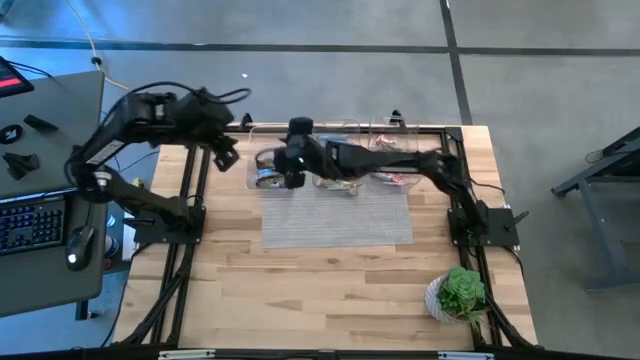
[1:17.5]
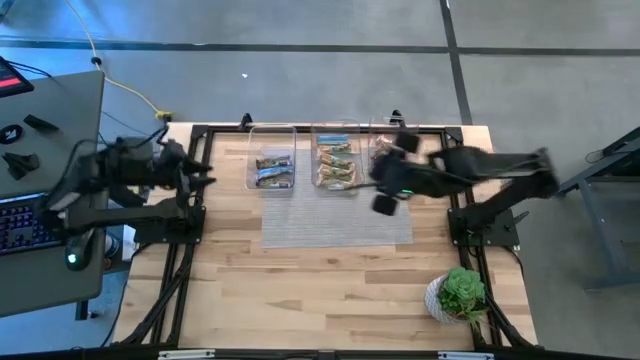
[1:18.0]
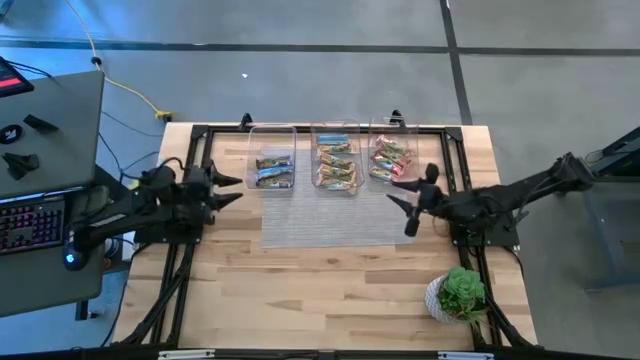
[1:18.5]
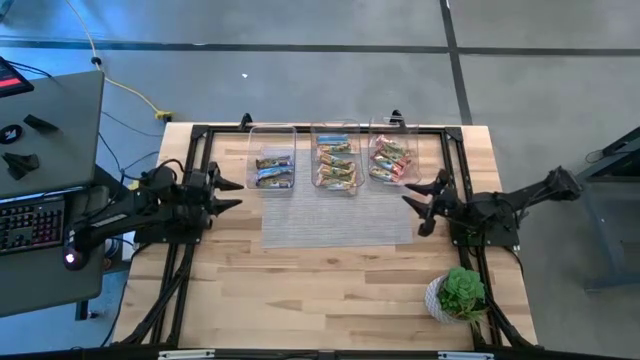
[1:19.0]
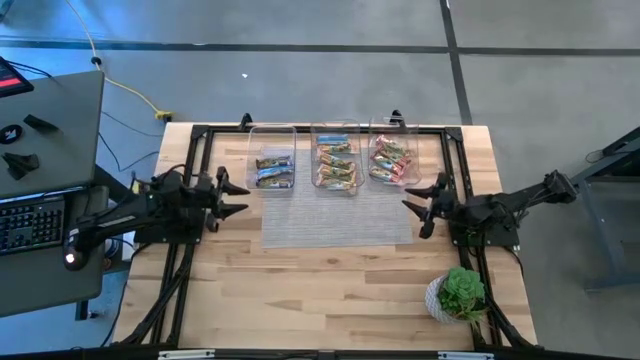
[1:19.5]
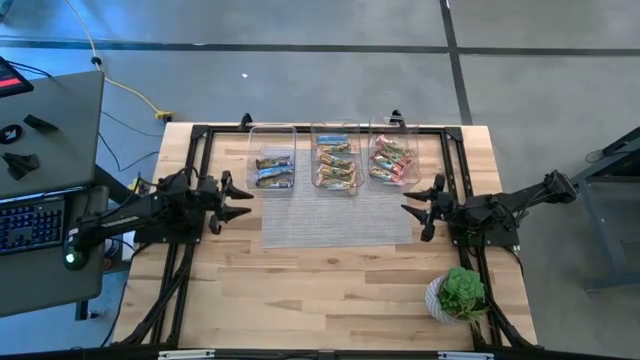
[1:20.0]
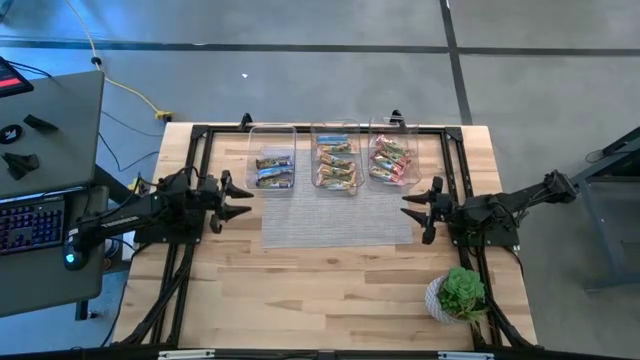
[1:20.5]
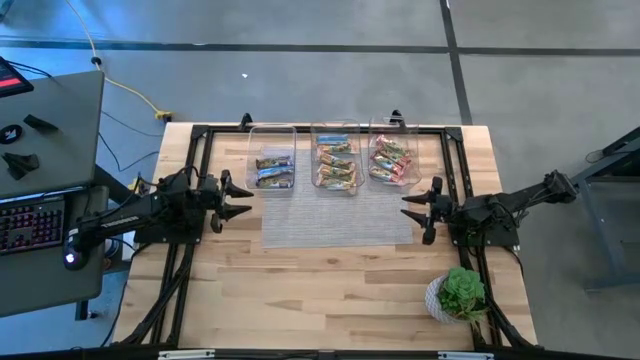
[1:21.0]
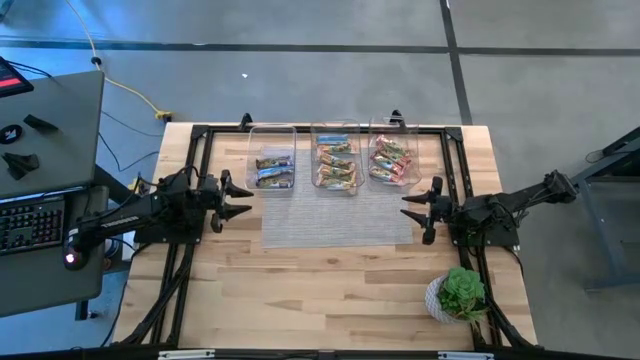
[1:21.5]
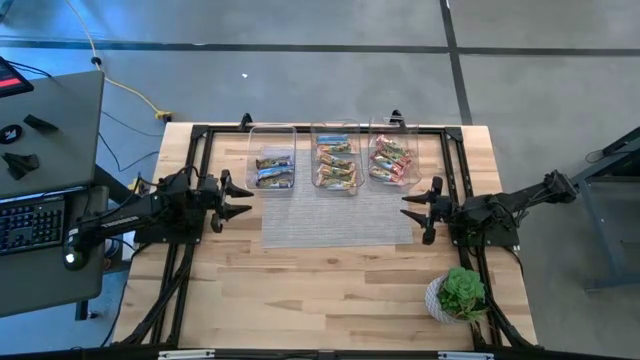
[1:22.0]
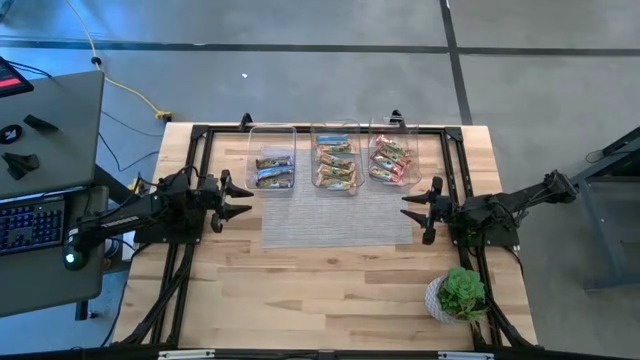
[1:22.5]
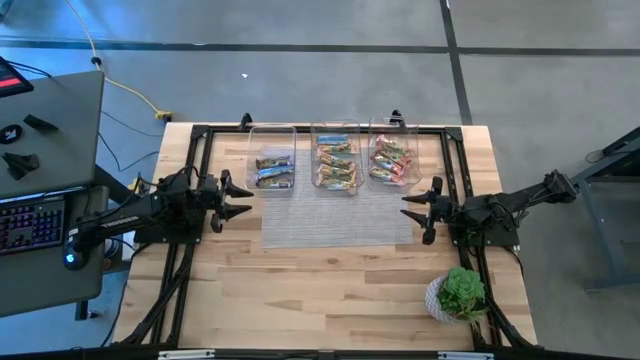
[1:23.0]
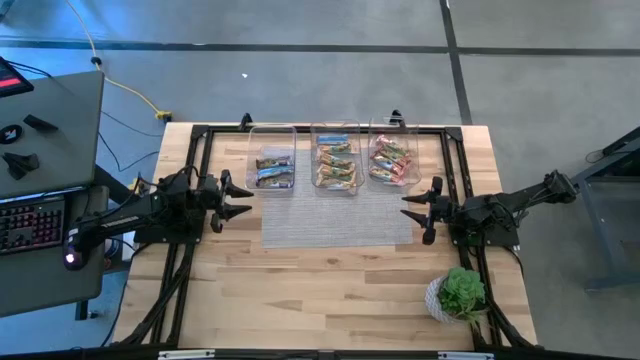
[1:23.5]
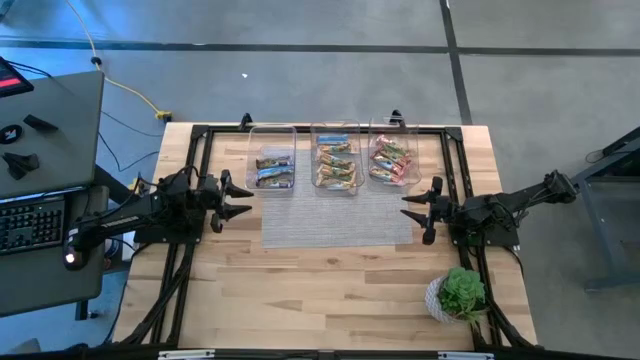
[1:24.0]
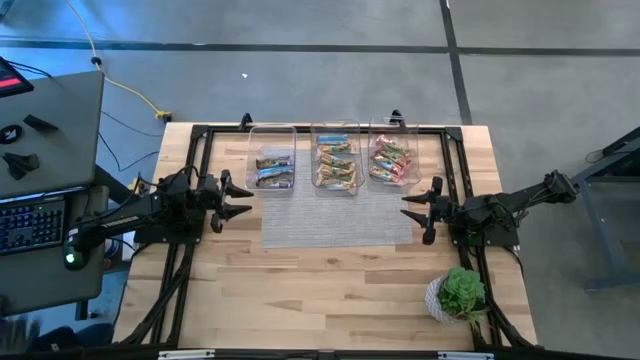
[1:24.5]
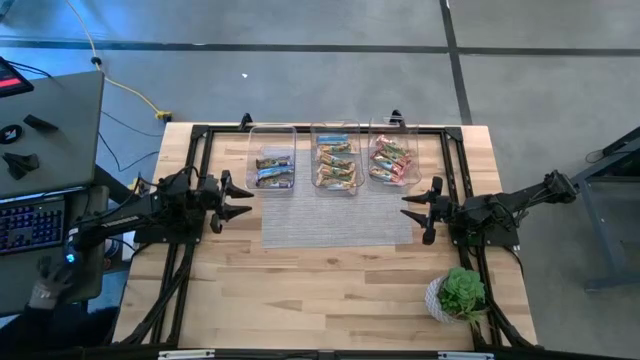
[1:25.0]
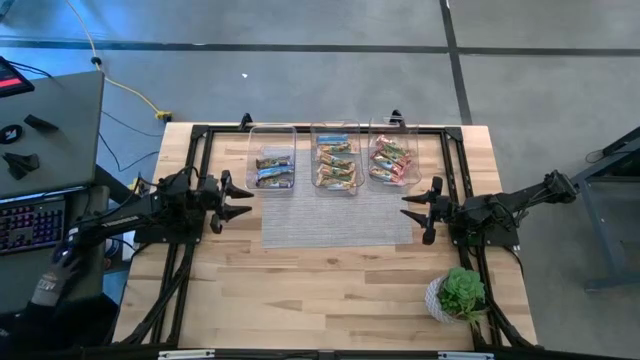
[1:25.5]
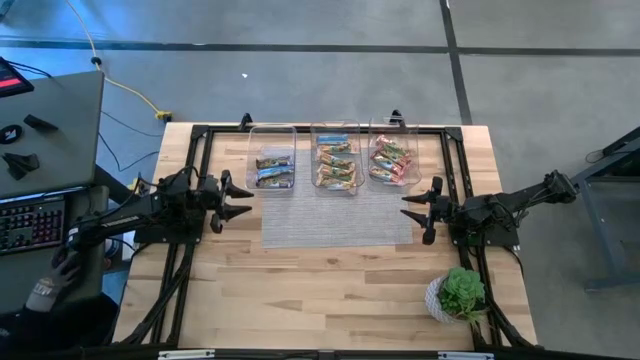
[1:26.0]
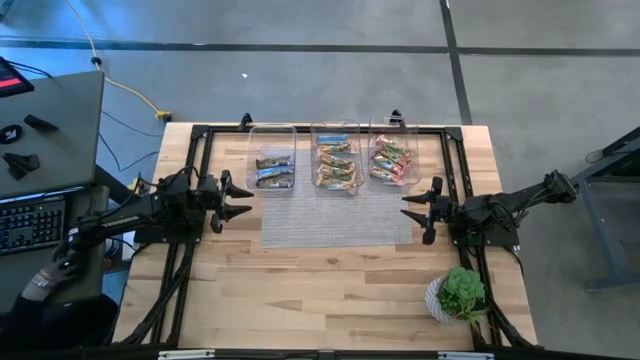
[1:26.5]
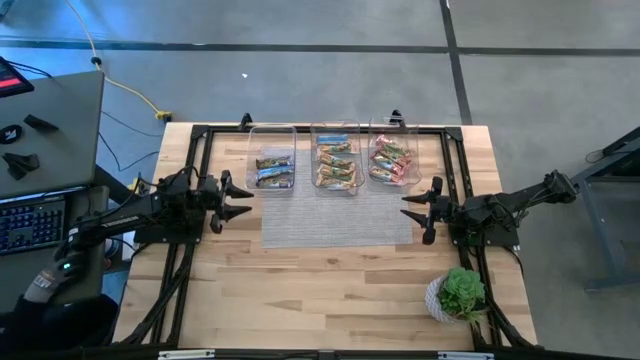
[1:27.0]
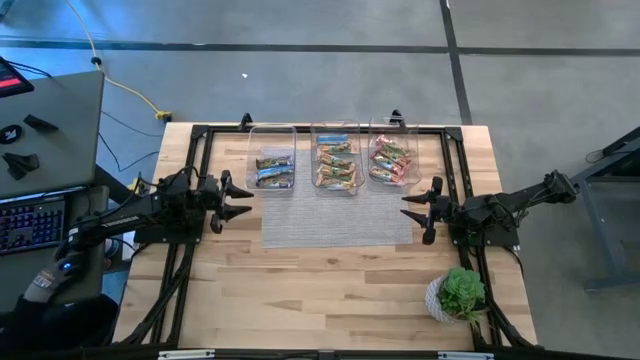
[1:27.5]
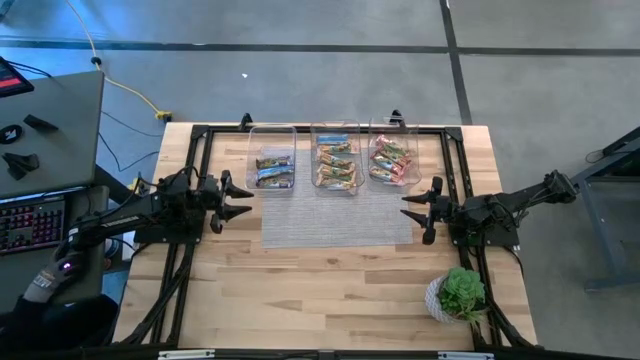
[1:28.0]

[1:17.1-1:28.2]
Task: Pick and place Granola Bars by type
Return to Home Position

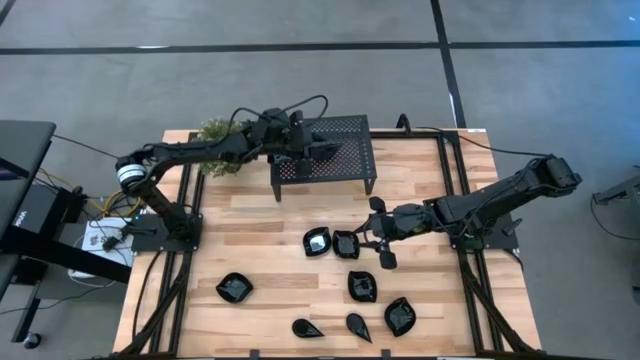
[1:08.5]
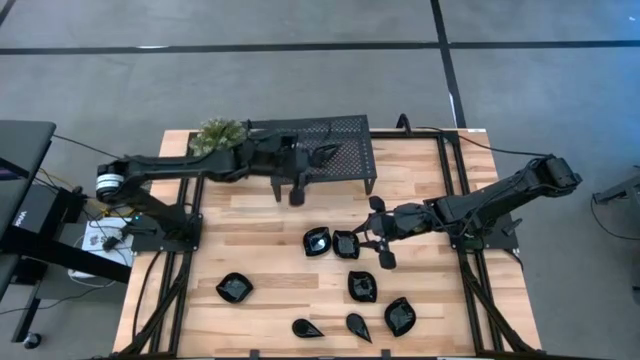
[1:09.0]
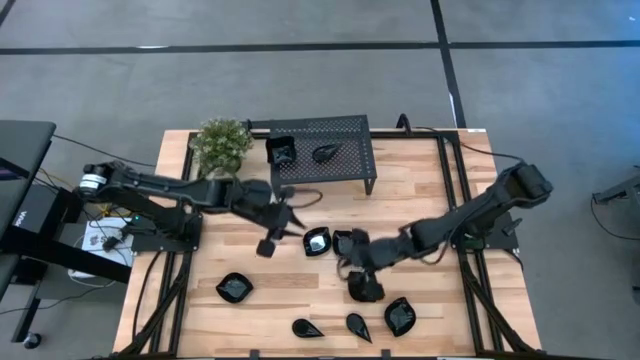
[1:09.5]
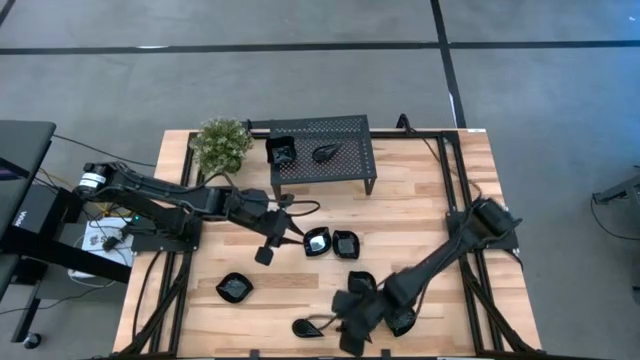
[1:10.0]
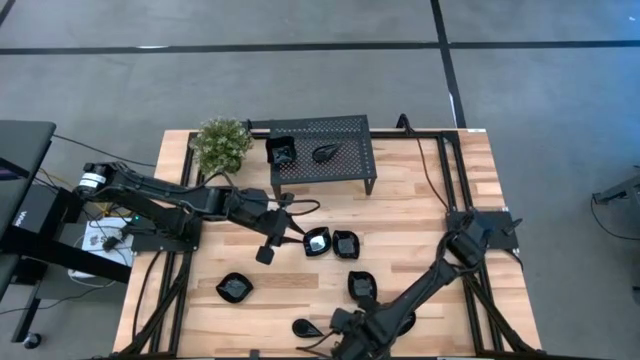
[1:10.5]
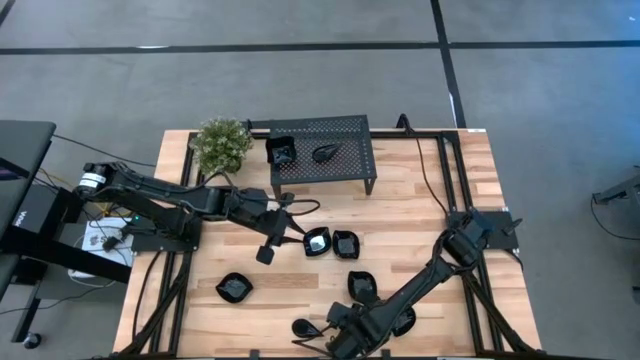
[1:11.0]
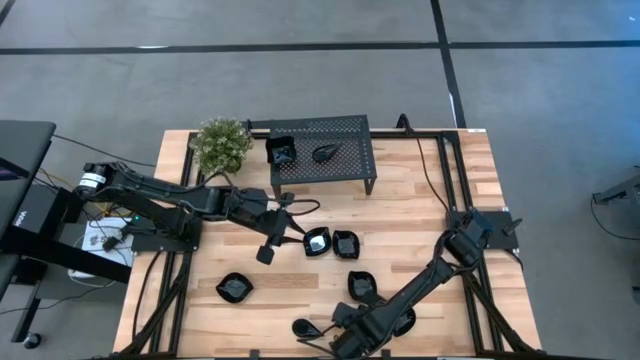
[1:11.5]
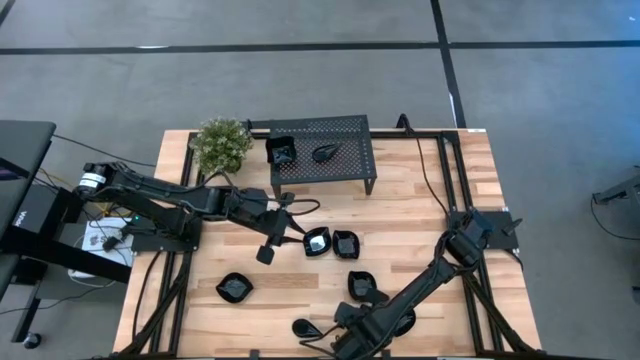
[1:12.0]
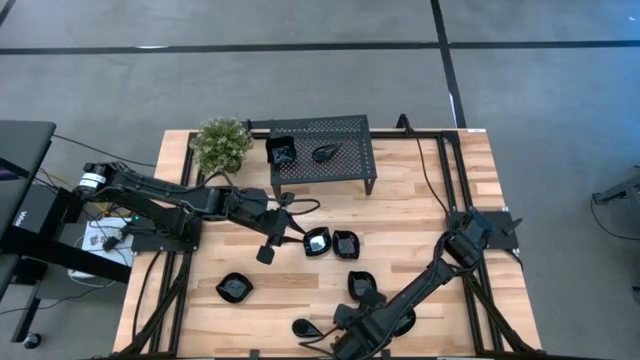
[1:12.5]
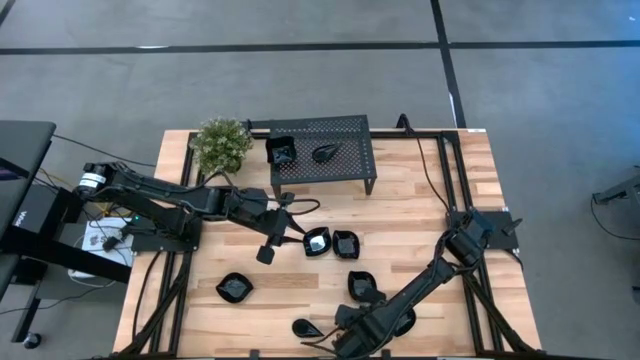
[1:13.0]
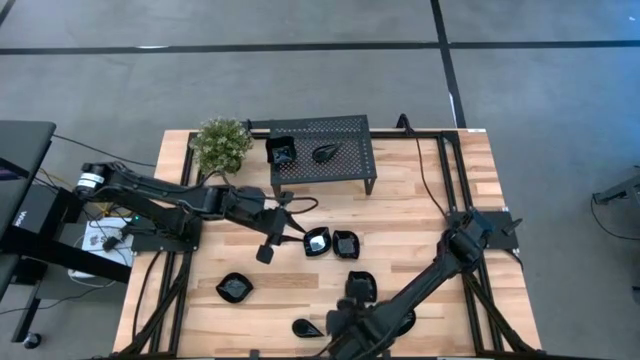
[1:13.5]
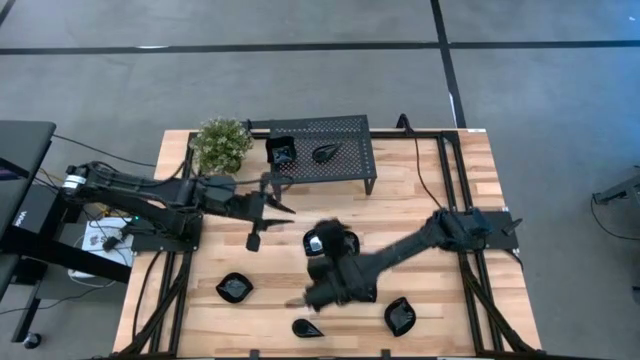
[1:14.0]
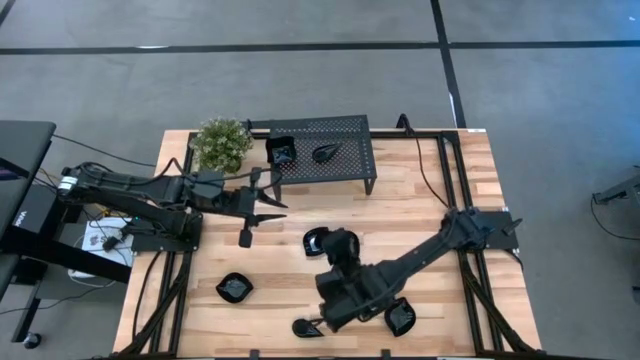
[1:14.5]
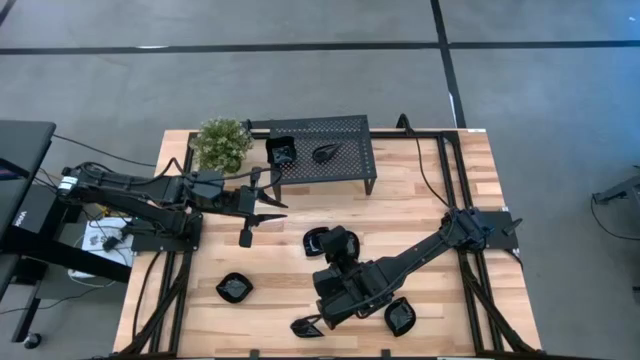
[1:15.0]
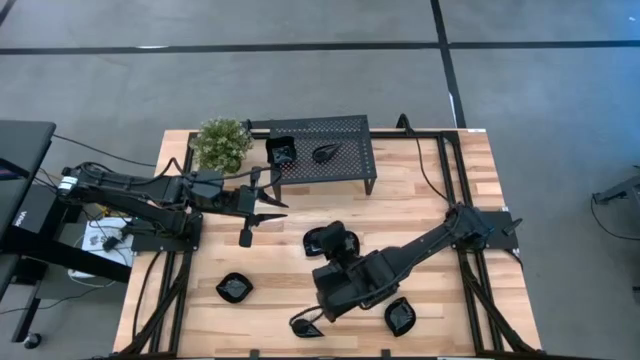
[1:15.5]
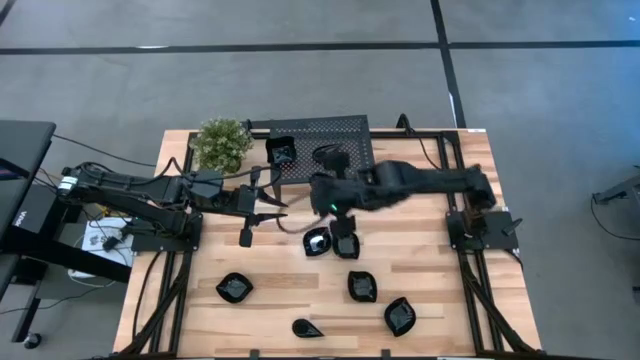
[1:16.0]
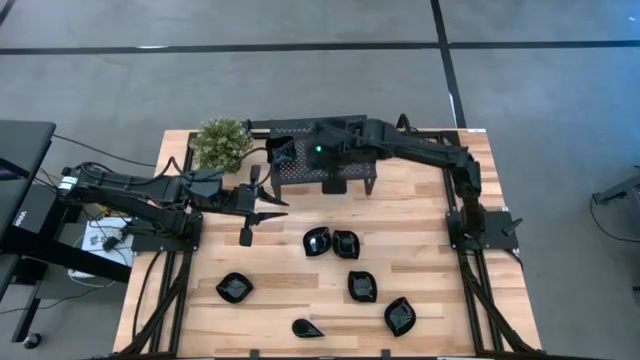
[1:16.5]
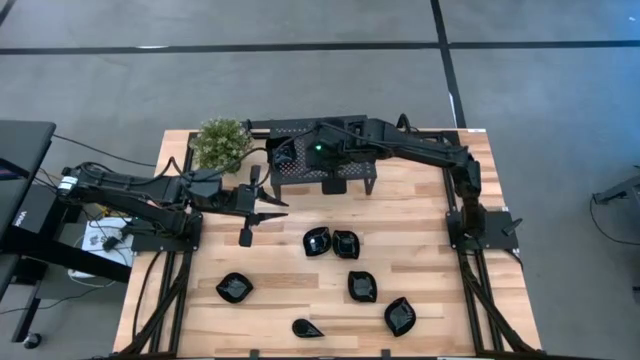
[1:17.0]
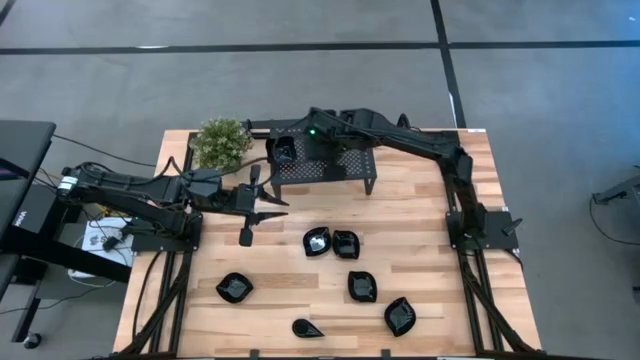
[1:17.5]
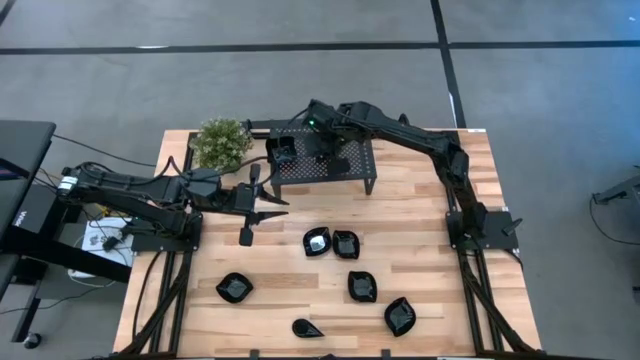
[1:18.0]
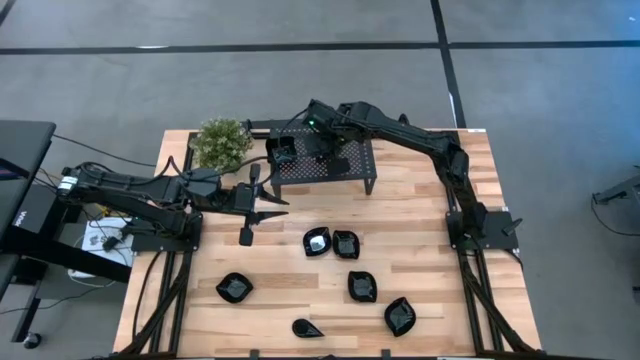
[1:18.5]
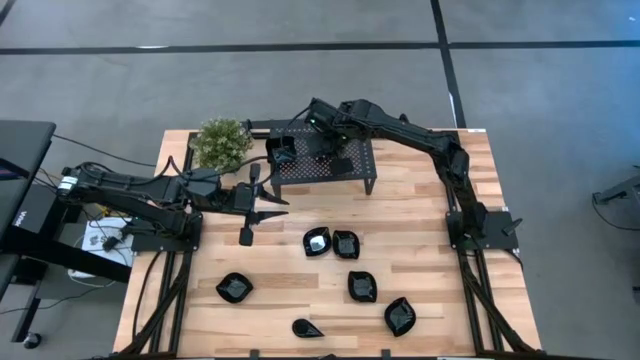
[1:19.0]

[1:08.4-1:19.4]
Task: Pick & Place Mini shaped plates
Stack the drop shaped plate on top of the drop shaped plates on the shelf
